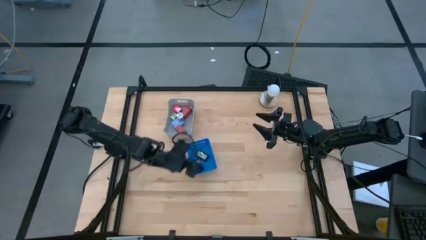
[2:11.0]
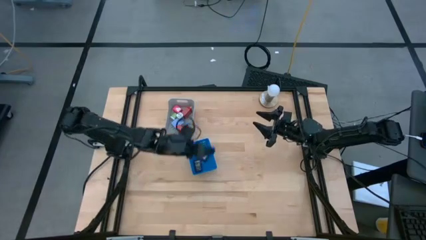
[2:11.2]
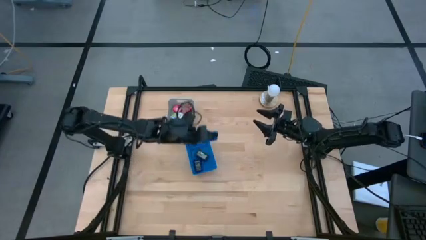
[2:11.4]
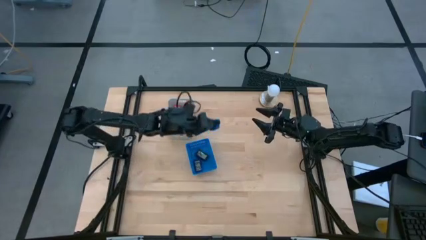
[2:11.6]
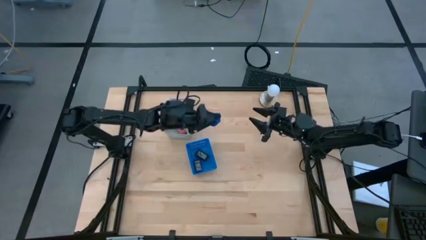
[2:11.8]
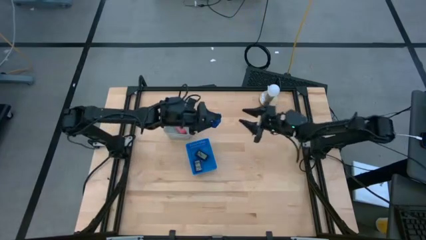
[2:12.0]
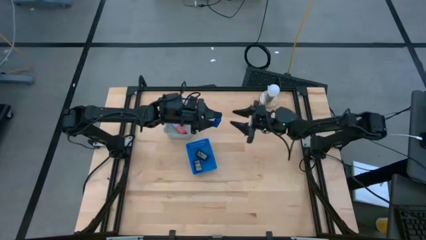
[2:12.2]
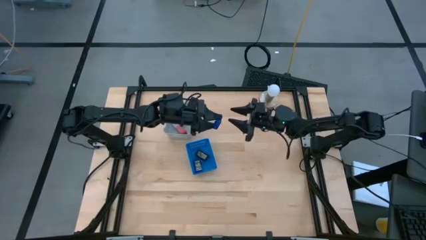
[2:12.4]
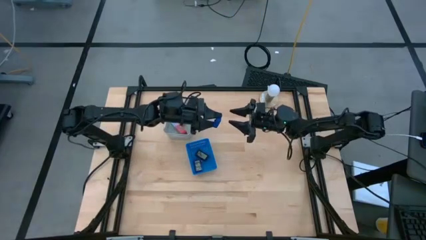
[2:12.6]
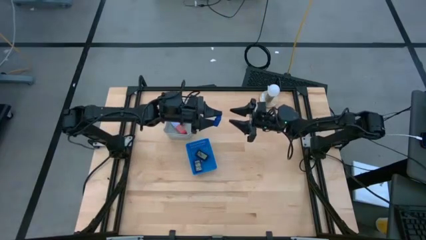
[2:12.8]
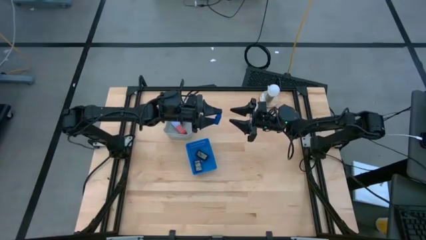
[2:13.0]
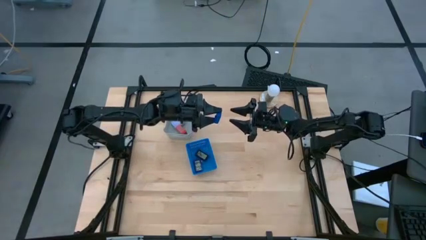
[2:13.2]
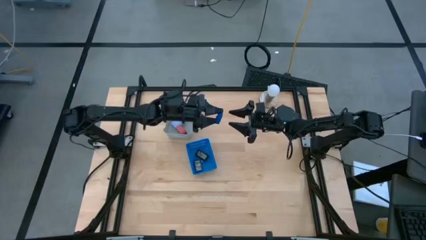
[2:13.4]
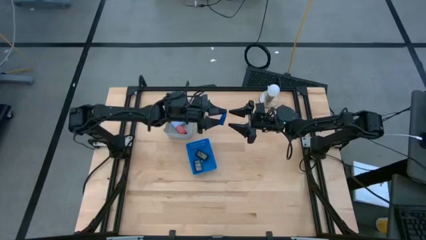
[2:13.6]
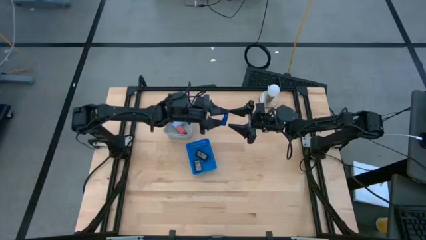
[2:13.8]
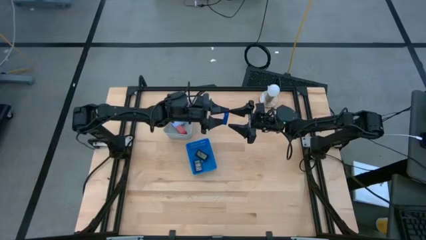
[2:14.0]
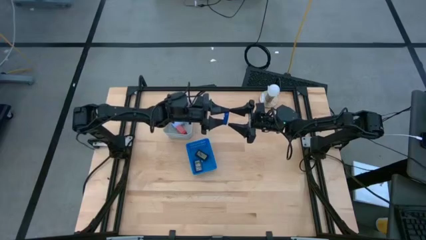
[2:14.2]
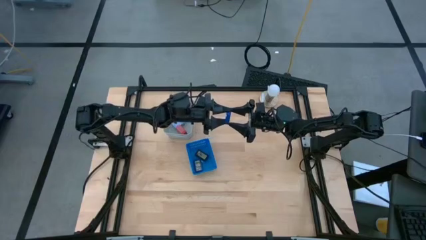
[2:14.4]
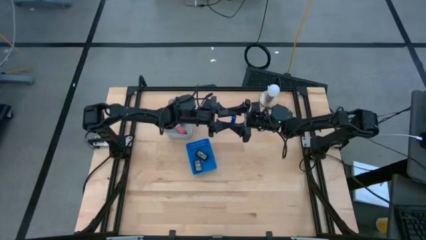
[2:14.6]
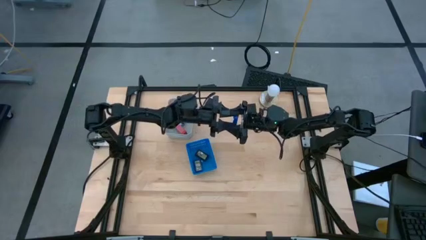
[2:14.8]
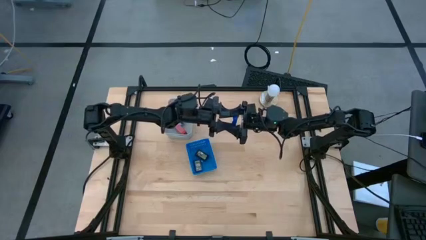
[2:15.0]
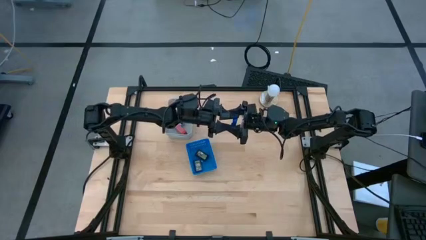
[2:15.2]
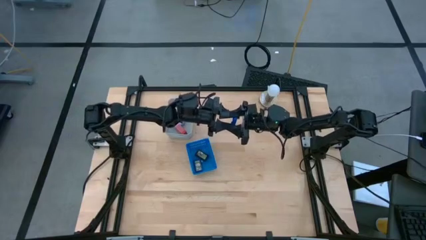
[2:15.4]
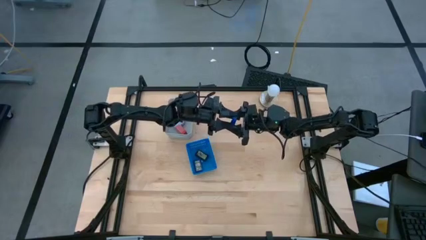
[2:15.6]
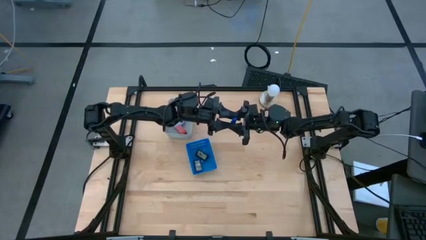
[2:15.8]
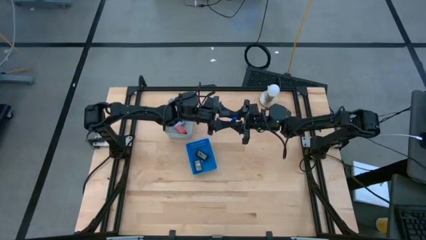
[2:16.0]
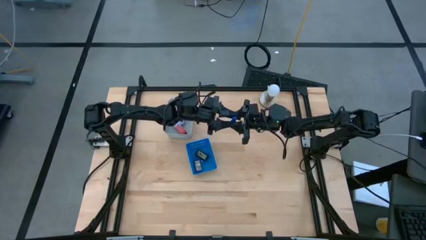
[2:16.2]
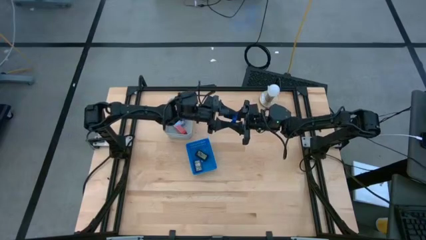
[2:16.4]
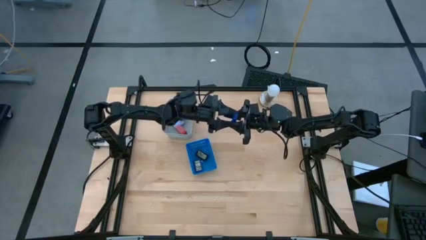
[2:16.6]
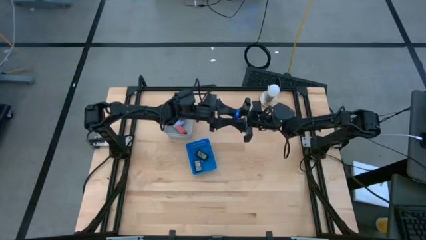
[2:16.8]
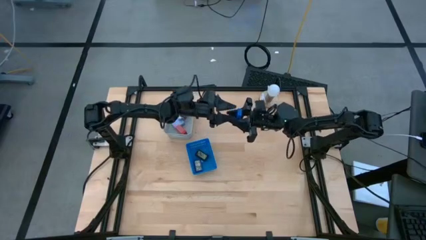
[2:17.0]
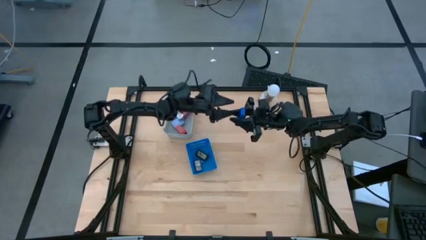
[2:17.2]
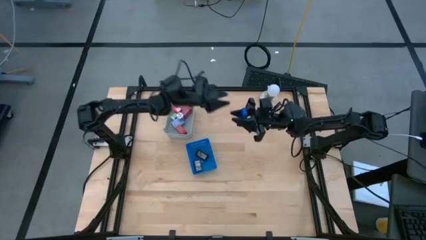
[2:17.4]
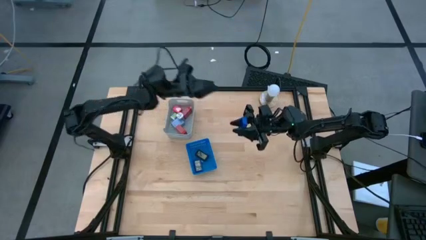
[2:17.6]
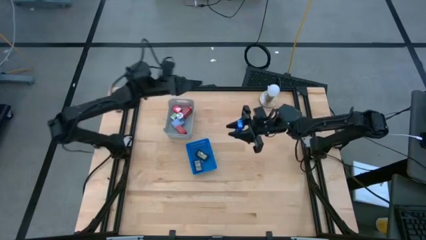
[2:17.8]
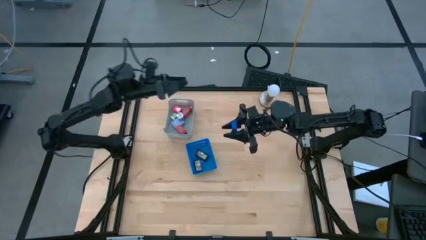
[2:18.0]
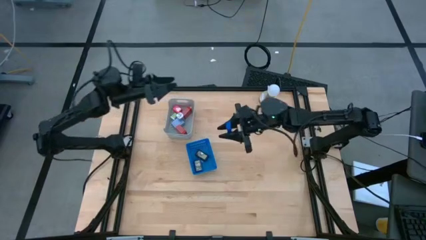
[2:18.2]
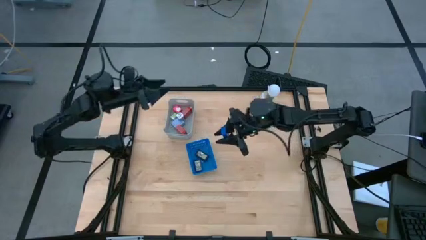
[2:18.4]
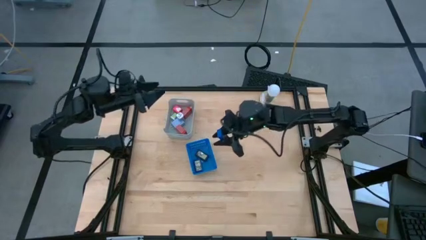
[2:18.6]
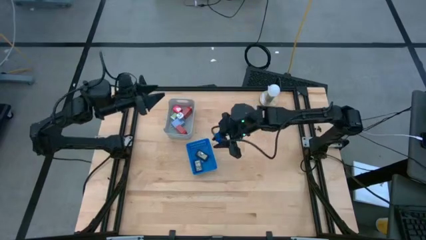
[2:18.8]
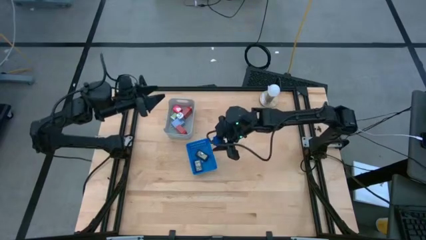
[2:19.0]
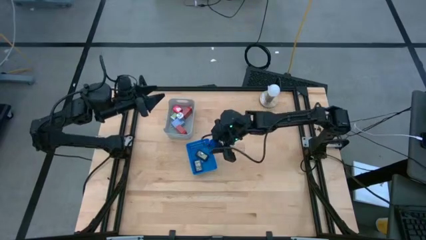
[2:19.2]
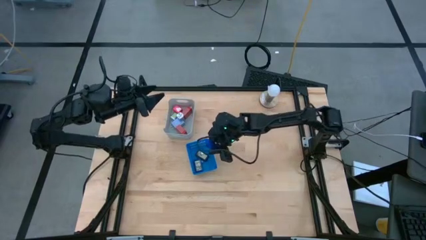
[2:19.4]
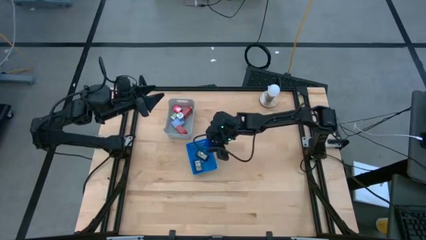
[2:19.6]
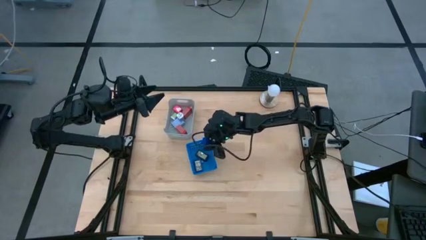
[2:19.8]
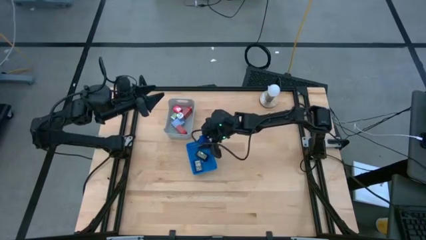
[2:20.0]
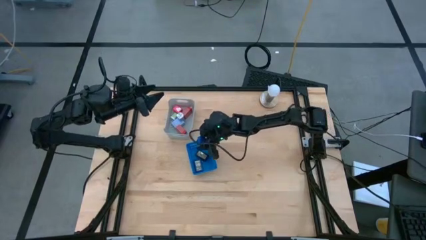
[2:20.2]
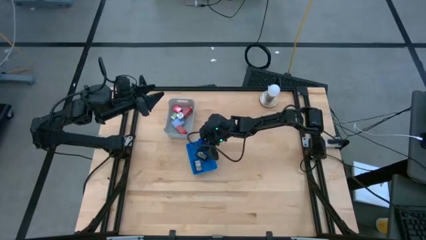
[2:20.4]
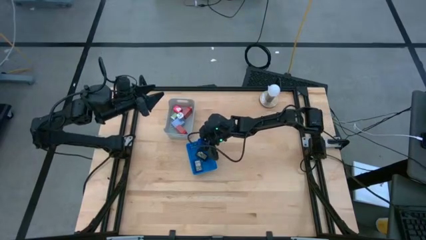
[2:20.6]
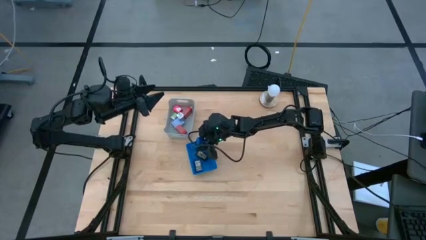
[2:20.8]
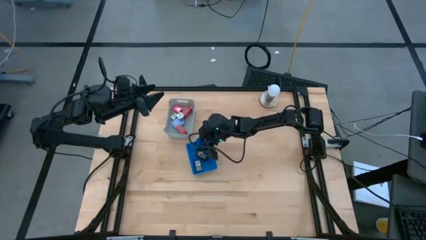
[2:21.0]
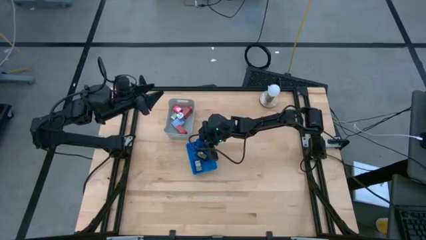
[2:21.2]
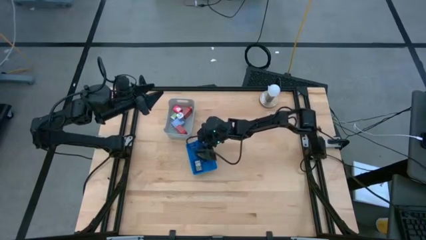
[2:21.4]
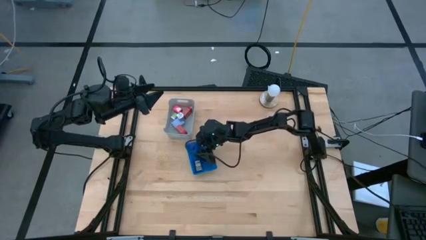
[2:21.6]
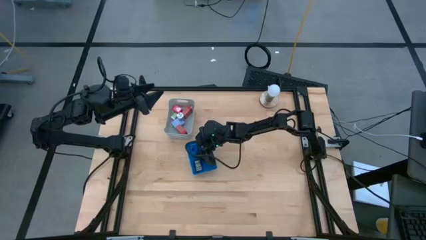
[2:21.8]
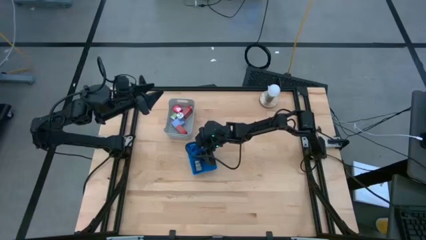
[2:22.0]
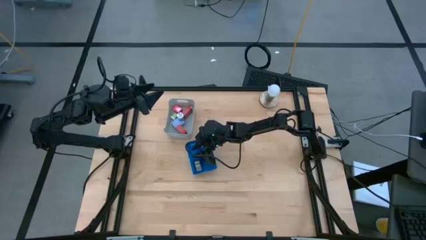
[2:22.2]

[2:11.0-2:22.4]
Task: Pick & Place Office items
Put the blue digital timer into the blue basket

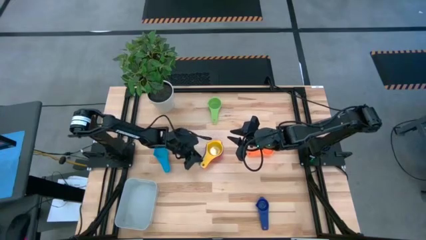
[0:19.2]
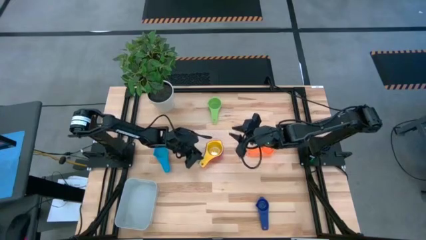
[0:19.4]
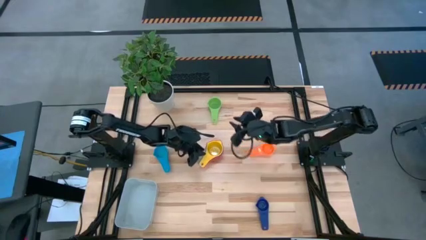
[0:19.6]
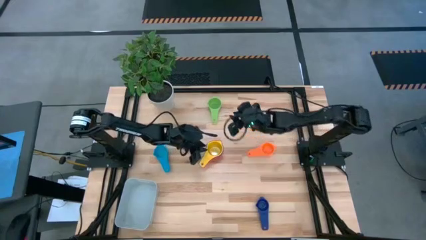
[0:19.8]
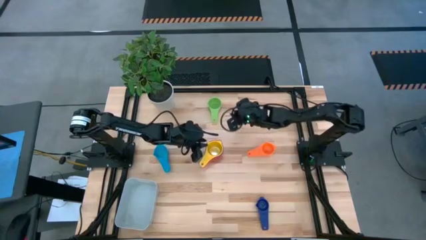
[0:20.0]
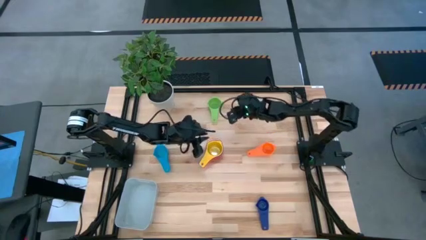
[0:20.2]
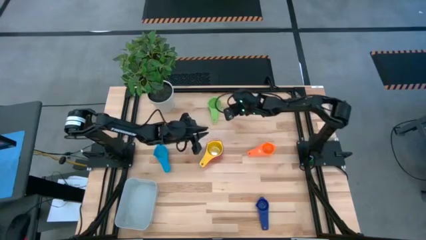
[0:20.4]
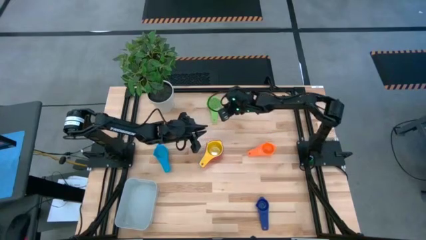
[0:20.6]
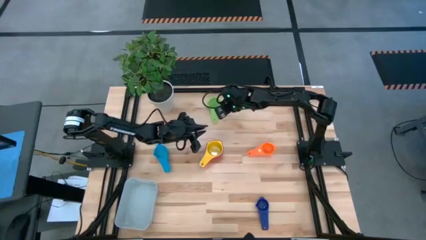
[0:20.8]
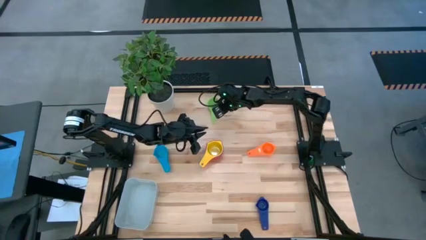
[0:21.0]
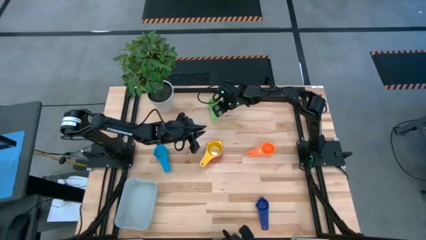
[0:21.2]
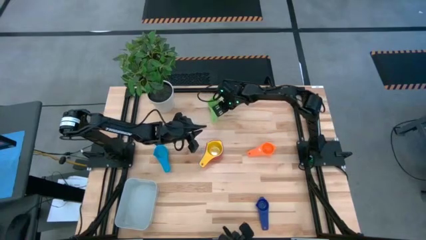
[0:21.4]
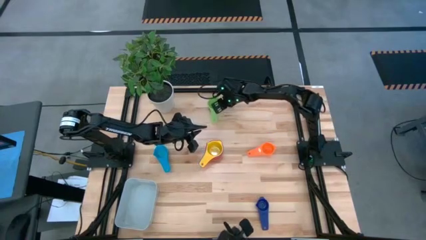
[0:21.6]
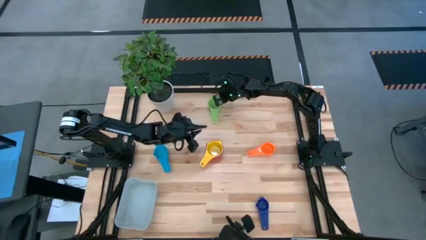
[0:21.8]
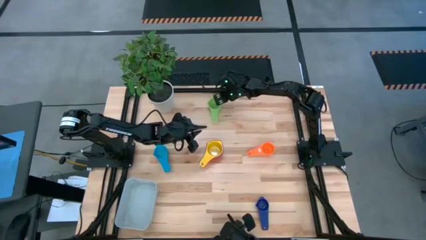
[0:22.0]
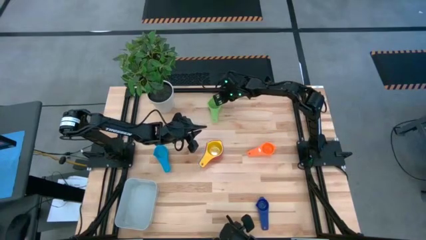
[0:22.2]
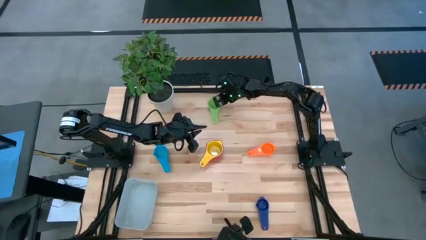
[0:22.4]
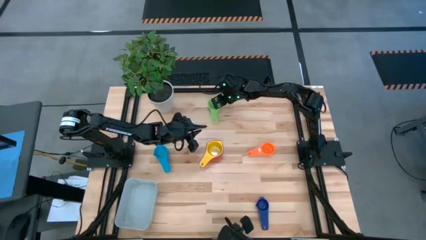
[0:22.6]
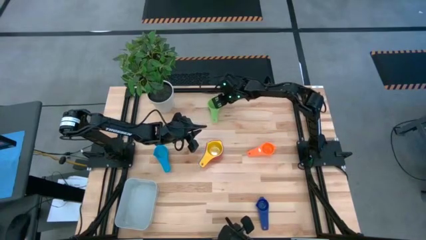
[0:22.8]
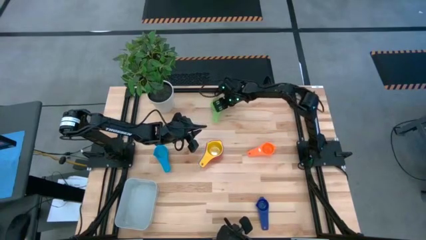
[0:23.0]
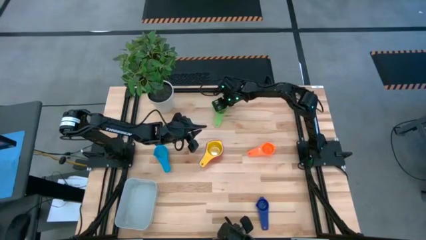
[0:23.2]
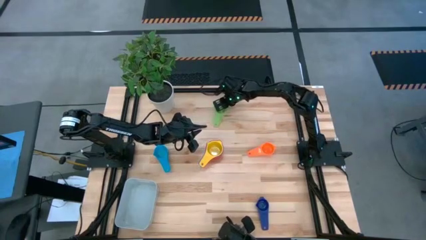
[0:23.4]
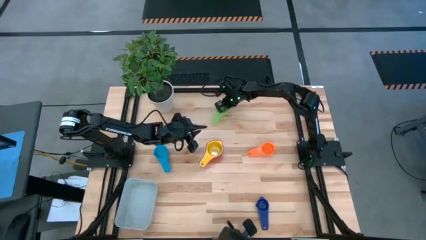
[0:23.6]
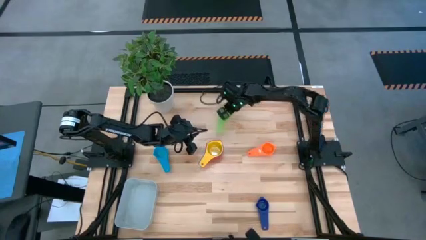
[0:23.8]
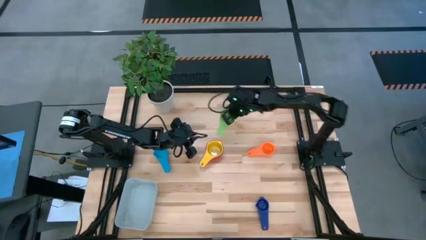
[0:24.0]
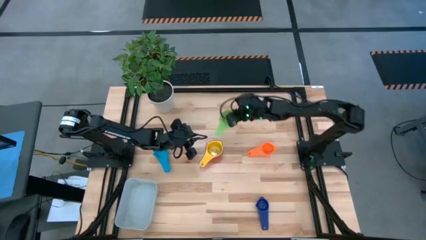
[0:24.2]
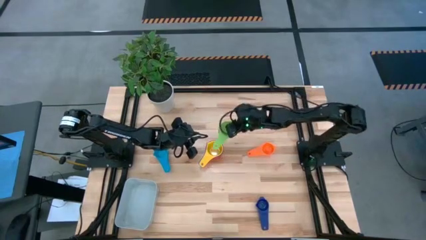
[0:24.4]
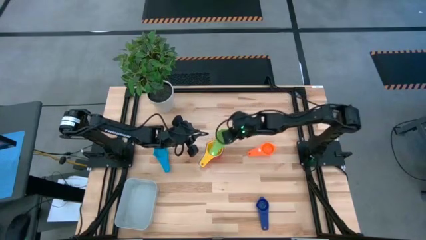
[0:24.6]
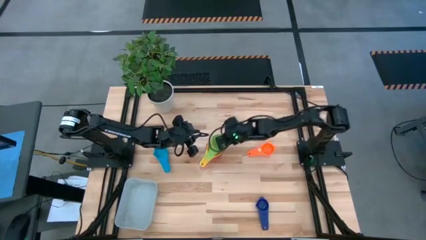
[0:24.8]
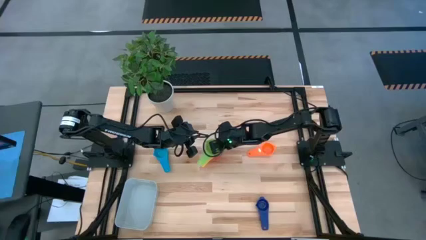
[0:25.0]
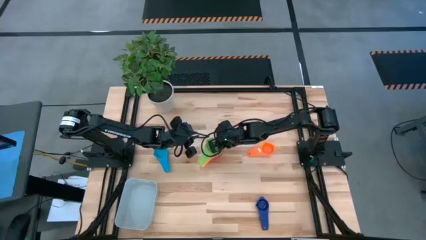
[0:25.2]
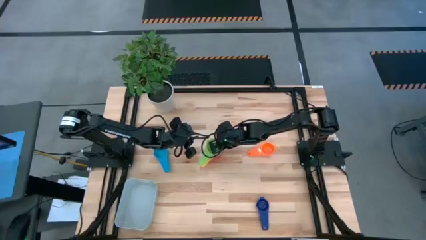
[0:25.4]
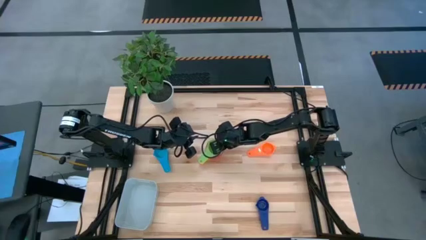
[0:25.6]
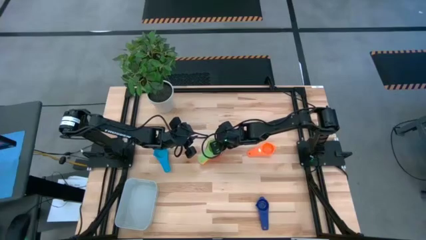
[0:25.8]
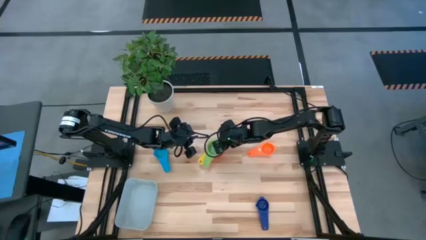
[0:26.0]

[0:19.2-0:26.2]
Task: Nest measuring cups in basket
Stack the green measuring cup on the yellow measuring cup
